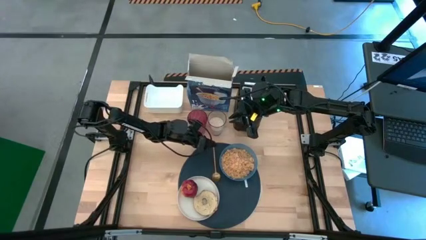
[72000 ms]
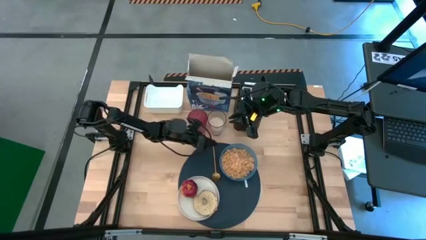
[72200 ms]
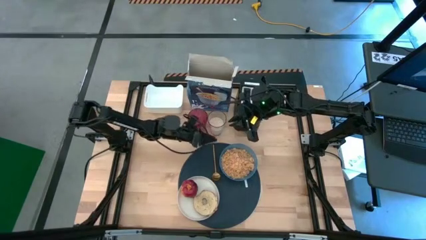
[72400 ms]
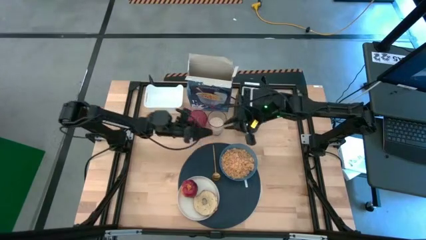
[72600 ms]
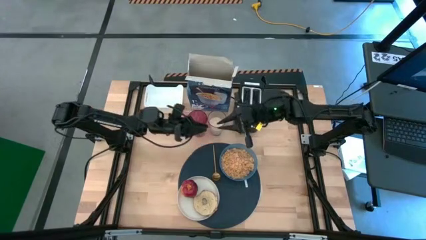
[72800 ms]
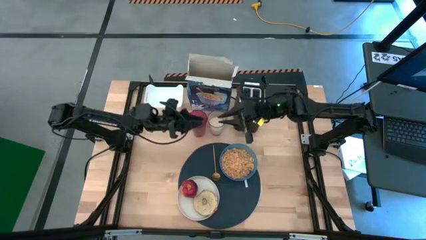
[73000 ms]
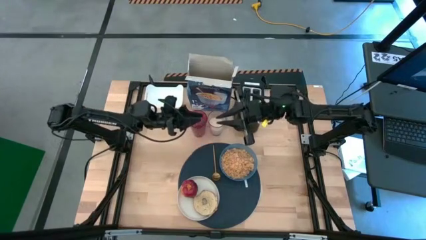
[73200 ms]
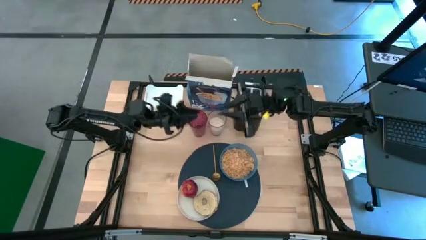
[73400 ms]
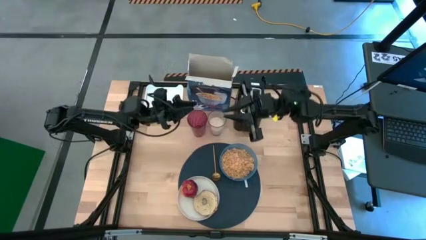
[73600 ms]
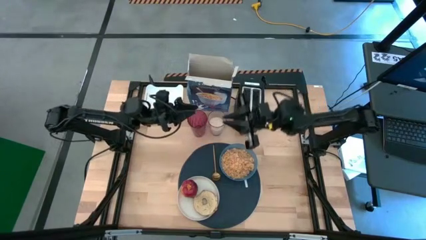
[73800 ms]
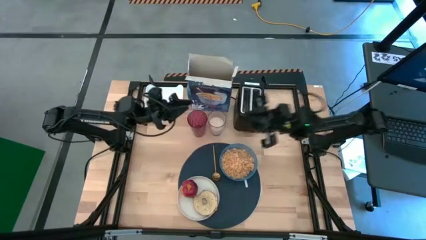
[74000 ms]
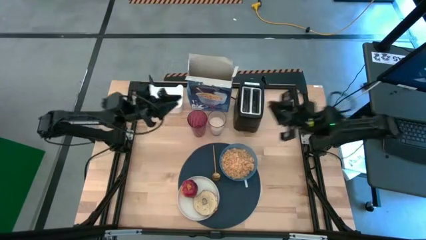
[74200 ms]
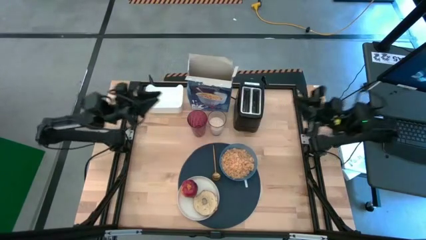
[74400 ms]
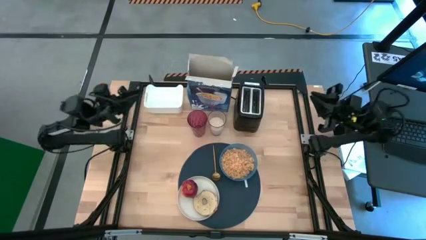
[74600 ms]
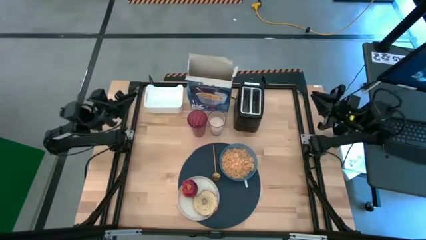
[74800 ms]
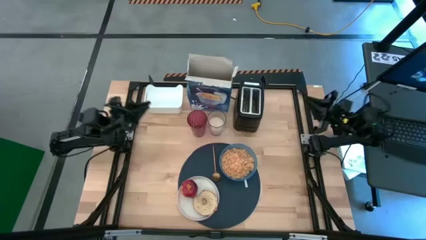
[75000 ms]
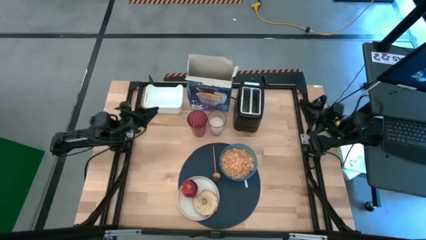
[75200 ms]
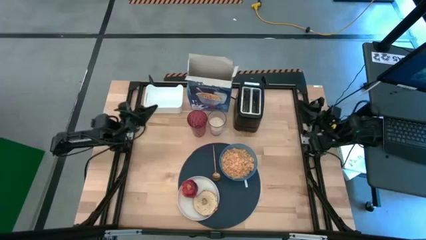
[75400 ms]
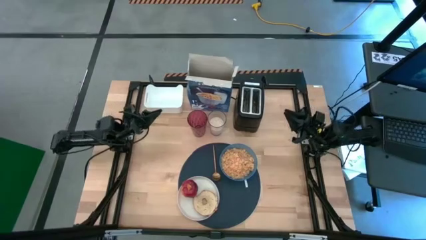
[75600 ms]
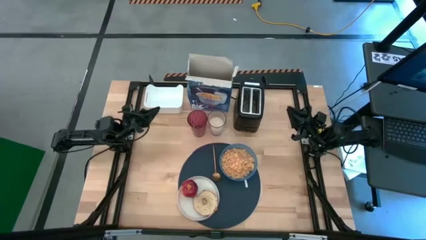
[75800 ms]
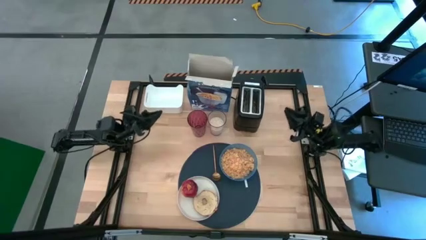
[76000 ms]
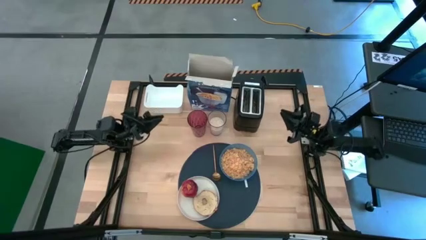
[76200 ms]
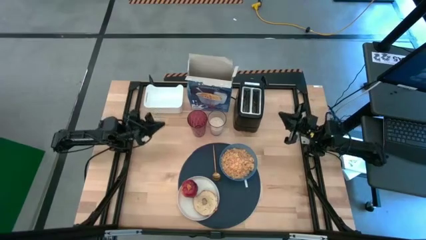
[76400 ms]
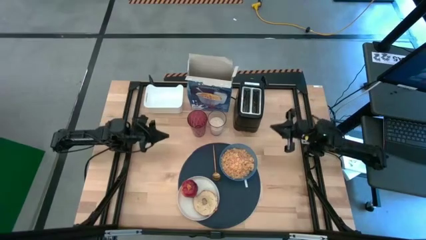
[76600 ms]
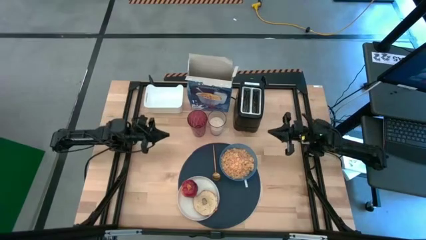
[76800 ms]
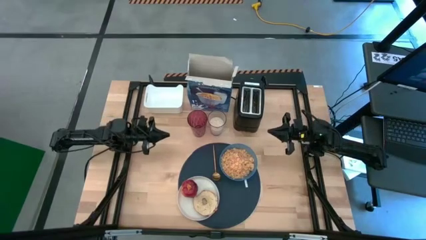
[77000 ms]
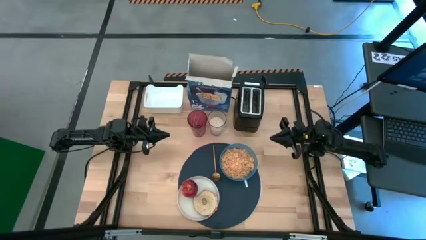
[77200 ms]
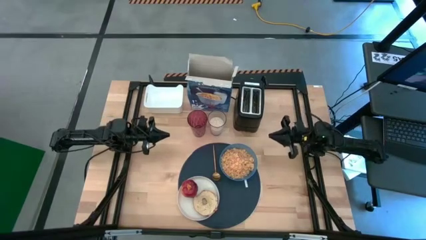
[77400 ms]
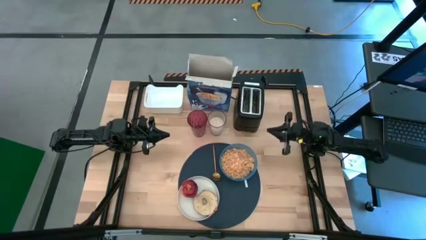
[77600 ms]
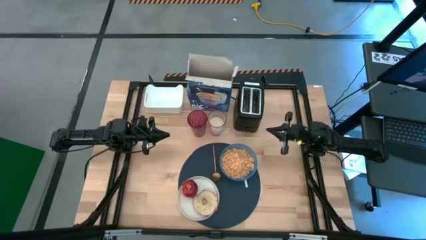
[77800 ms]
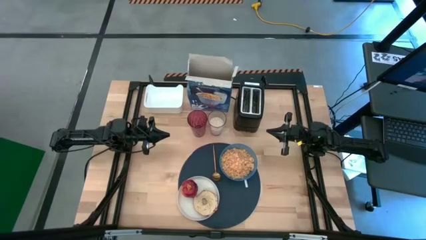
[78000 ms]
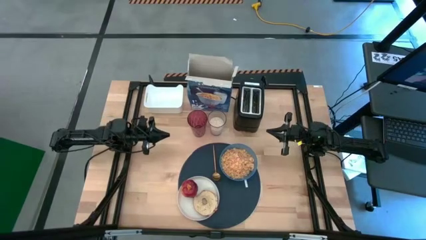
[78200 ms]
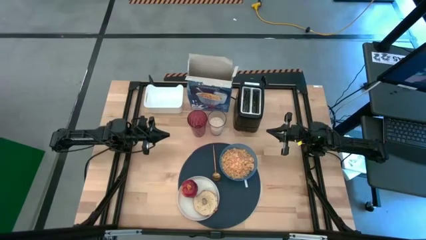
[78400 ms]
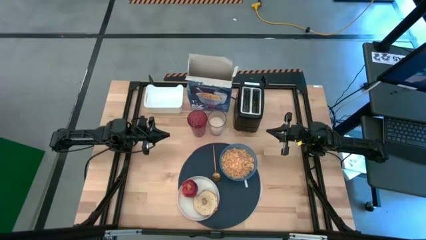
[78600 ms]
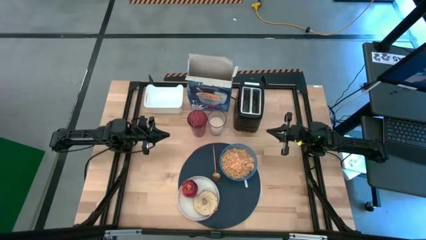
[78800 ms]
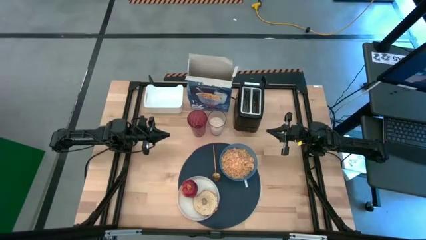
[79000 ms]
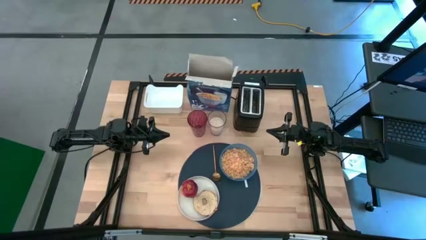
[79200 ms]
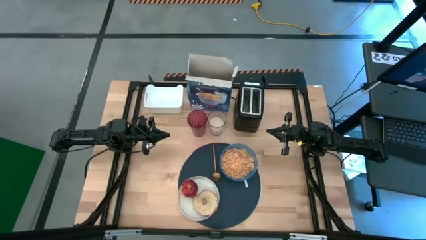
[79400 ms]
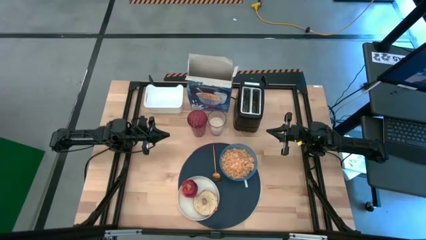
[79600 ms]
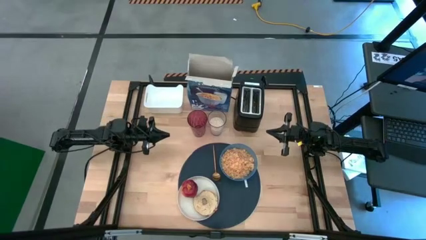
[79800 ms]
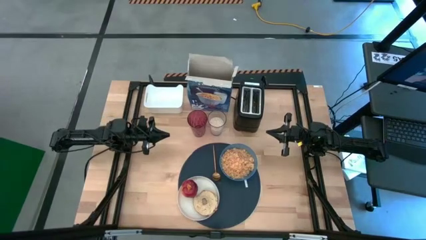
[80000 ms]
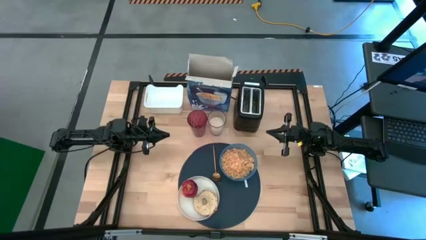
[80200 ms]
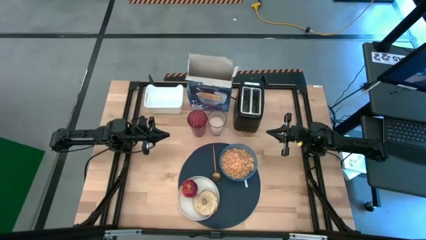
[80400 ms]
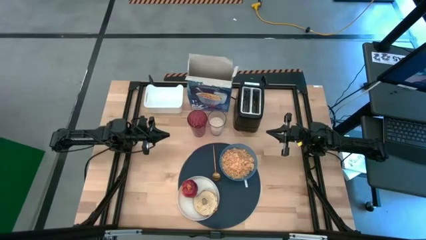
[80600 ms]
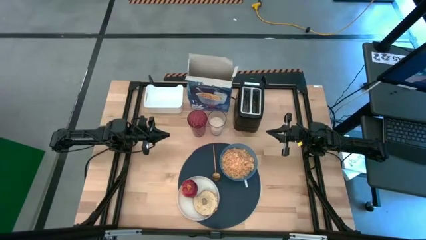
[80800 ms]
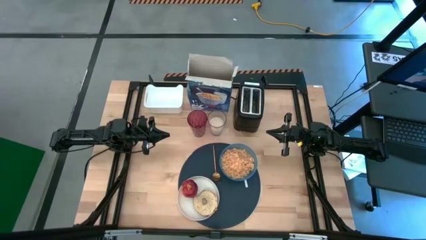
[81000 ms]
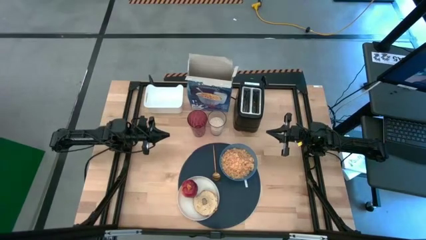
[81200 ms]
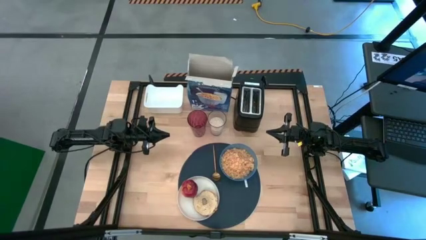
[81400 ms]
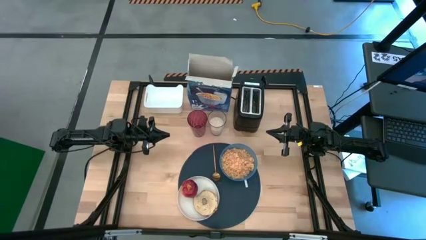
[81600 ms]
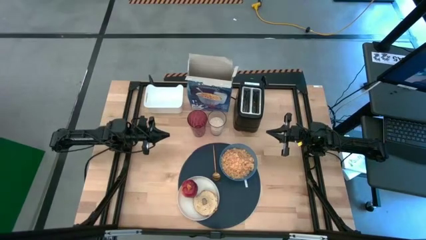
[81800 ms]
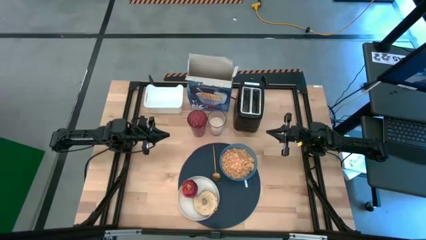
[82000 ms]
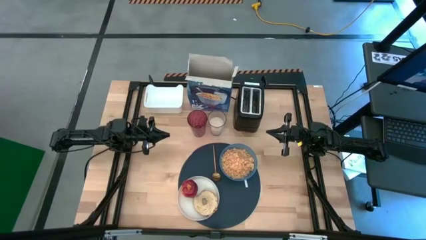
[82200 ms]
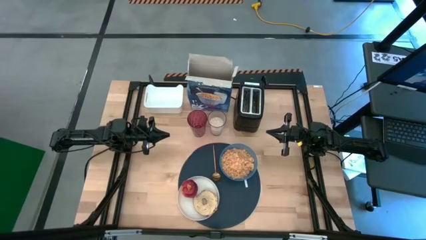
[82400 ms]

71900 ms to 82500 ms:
Task: Arrange a breakfast setting
Return to Home Position

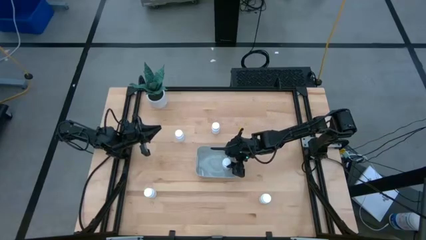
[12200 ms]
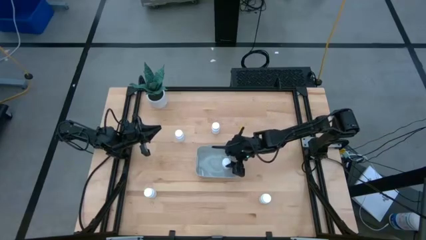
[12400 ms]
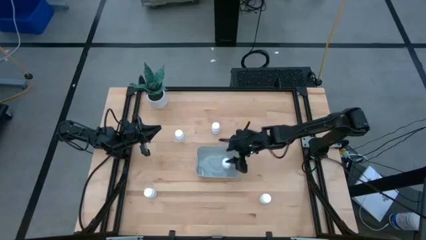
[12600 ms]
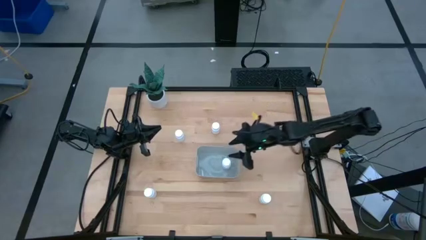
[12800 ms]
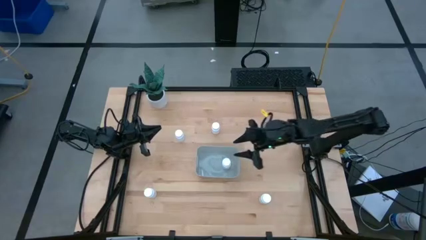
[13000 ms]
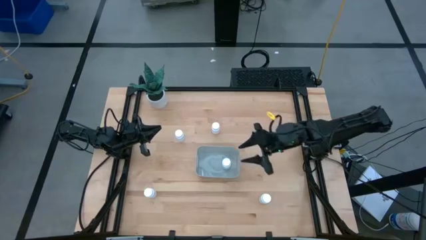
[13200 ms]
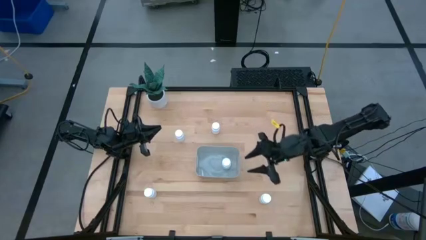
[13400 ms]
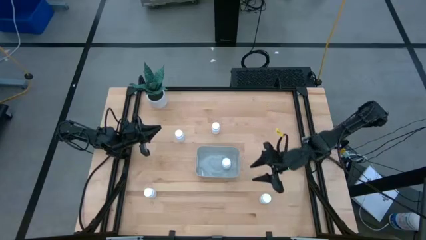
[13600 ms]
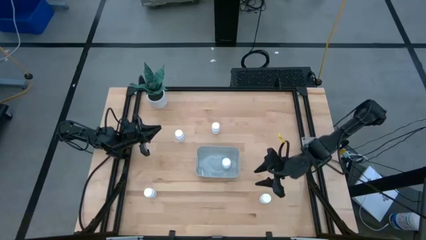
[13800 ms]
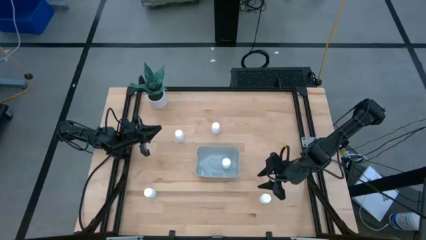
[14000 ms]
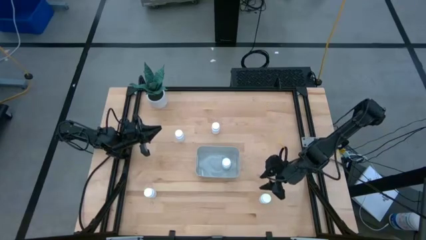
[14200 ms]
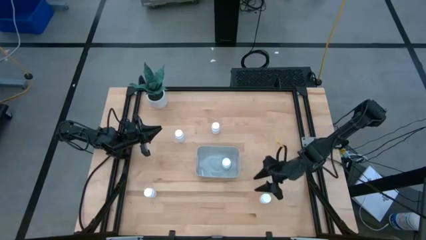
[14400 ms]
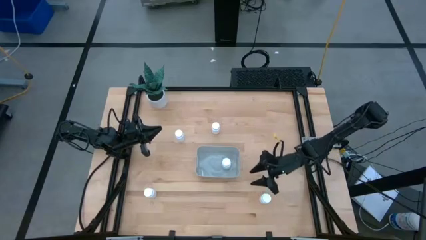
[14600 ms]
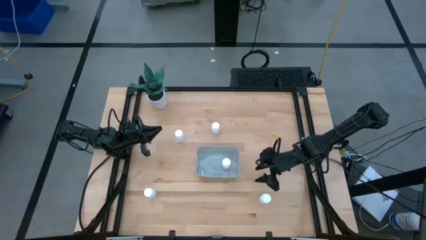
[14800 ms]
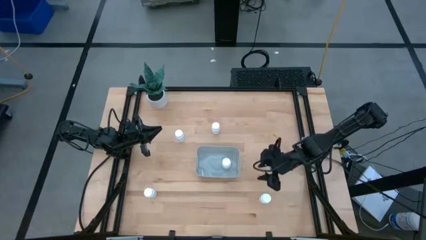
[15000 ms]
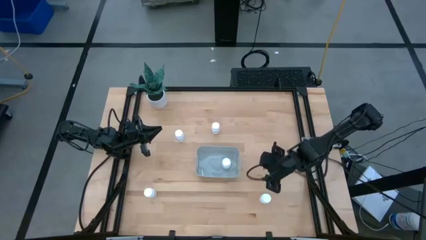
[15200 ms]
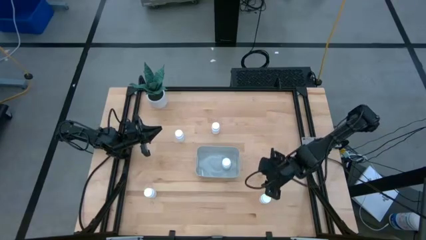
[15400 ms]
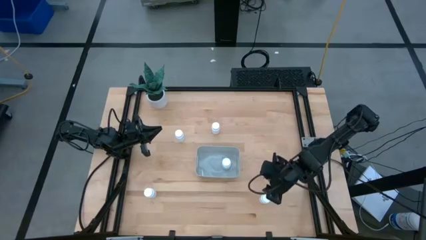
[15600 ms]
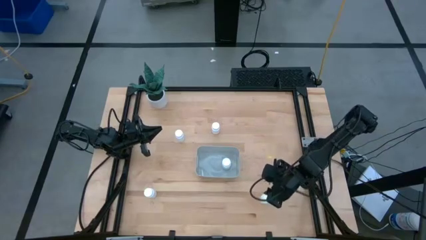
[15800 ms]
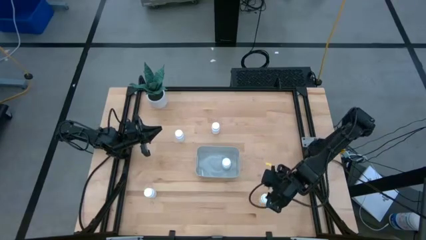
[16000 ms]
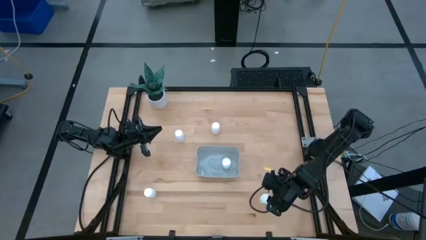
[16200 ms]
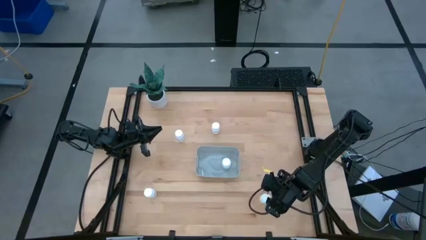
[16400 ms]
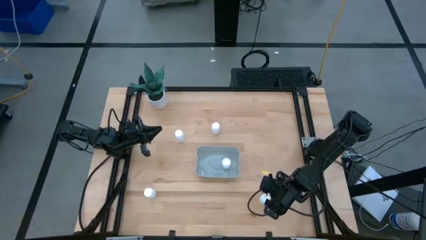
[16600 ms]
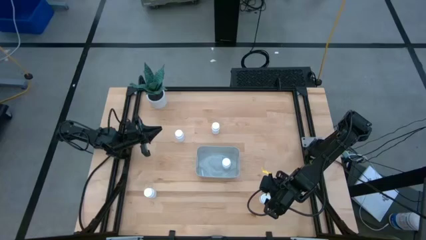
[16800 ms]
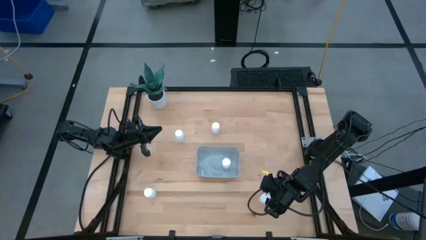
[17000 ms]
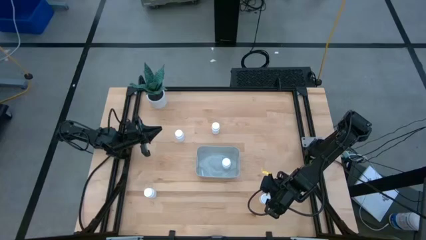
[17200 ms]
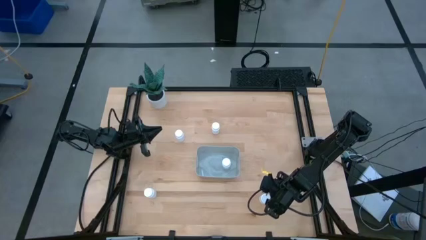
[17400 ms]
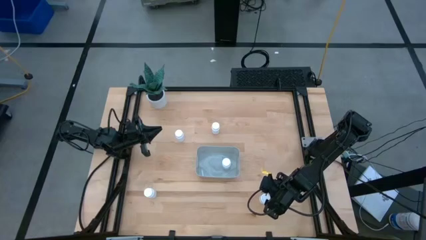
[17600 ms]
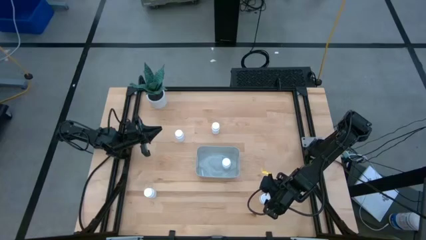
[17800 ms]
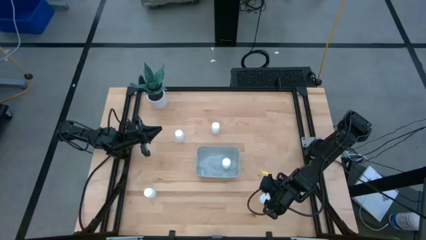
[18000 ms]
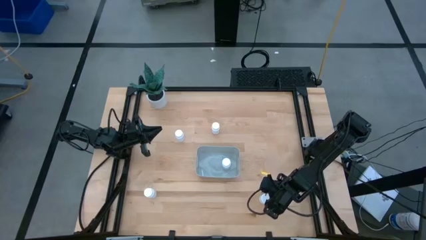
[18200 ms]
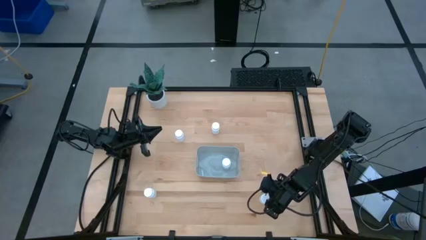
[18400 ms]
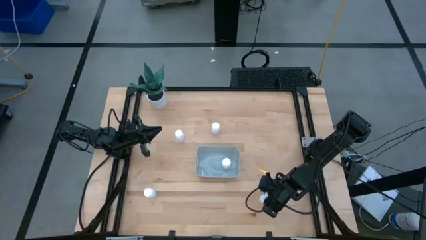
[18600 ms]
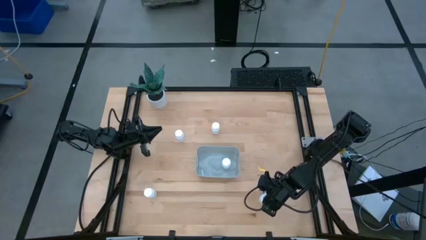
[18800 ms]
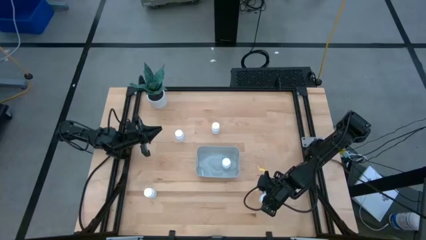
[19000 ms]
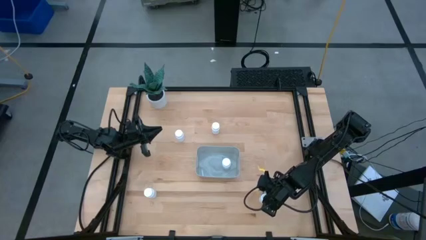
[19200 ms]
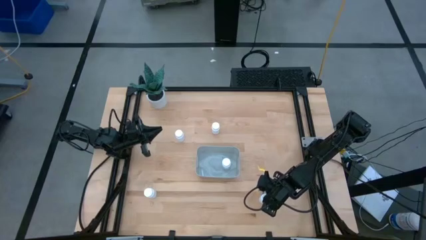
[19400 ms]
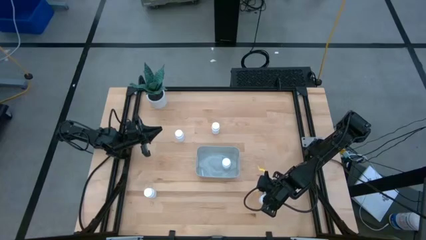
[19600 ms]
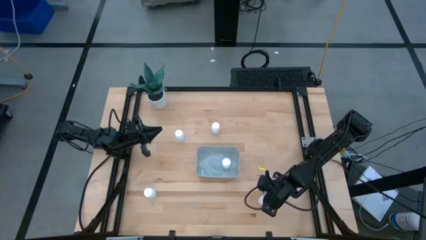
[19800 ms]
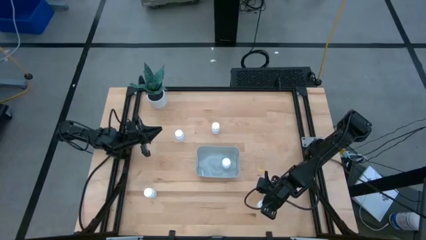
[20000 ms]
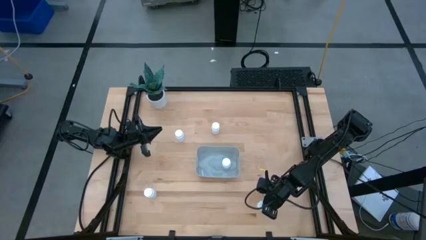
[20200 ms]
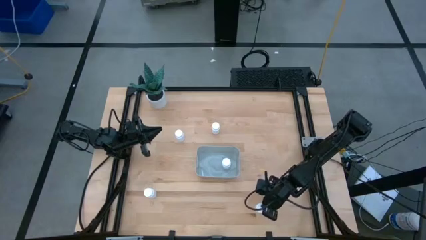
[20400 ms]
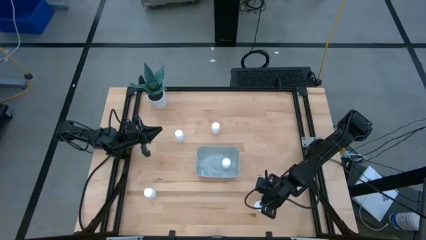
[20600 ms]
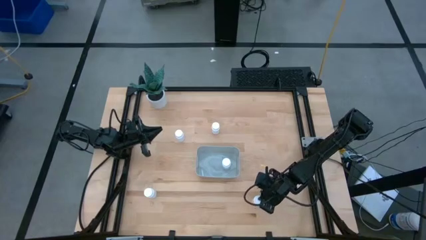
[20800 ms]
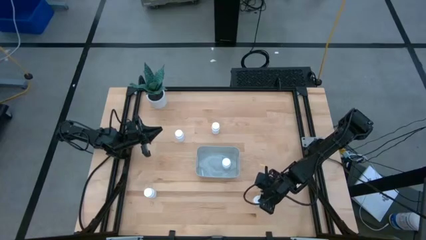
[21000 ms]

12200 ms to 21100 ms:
Task: Pick and place pill bottles into a basket
Put the white pill bottle into the gray bin
